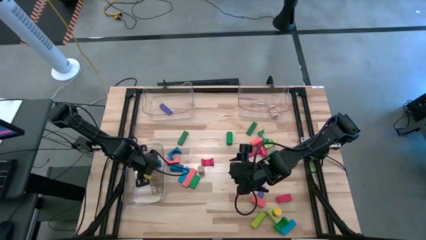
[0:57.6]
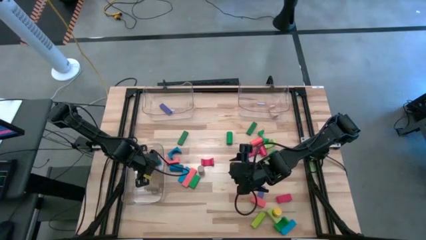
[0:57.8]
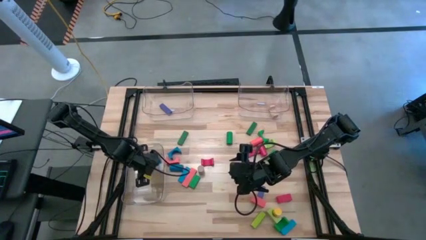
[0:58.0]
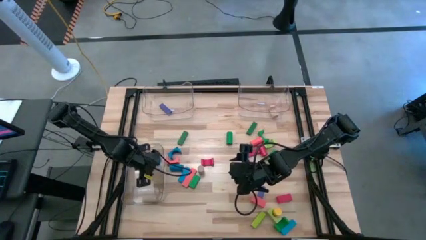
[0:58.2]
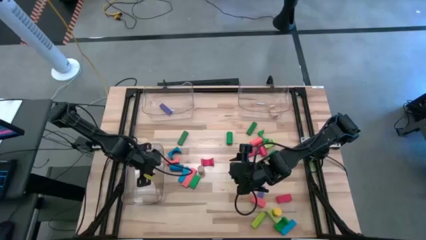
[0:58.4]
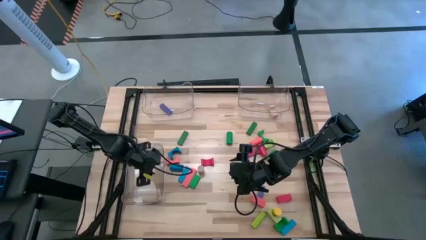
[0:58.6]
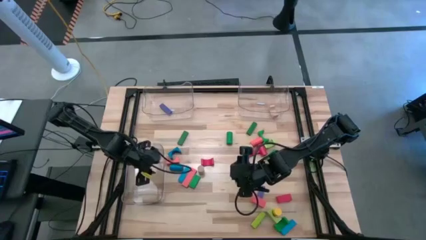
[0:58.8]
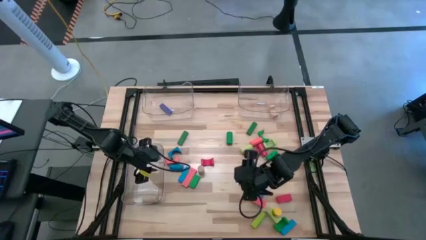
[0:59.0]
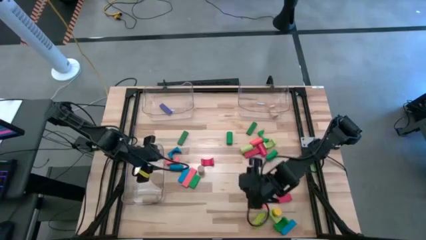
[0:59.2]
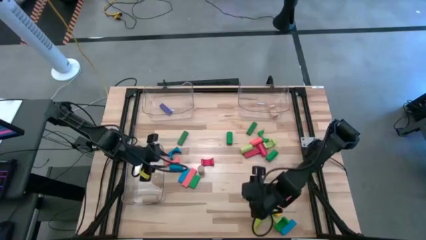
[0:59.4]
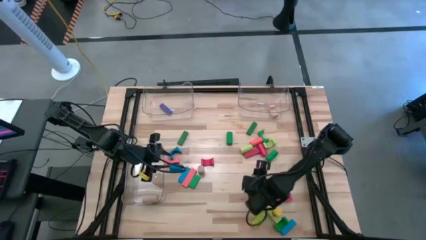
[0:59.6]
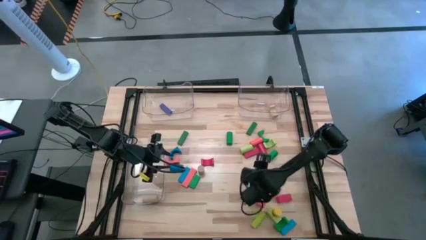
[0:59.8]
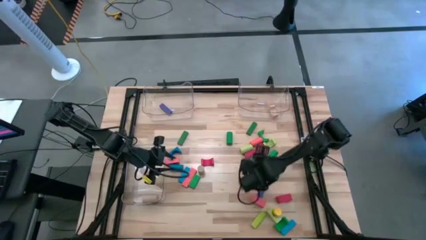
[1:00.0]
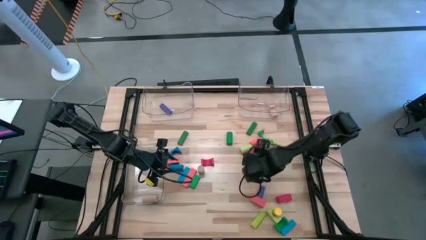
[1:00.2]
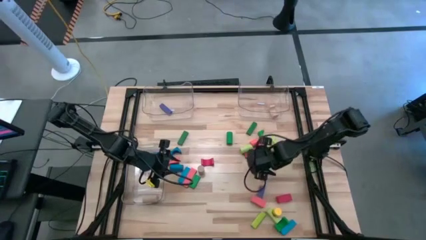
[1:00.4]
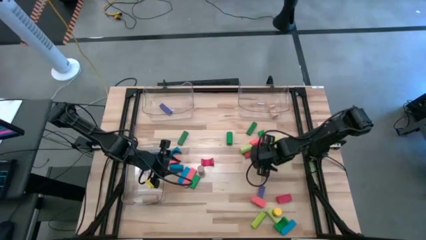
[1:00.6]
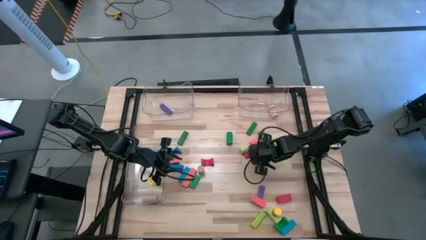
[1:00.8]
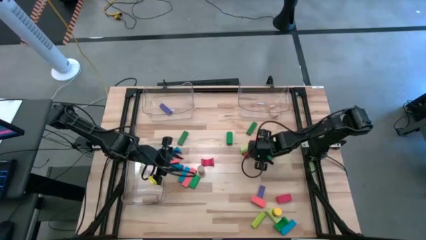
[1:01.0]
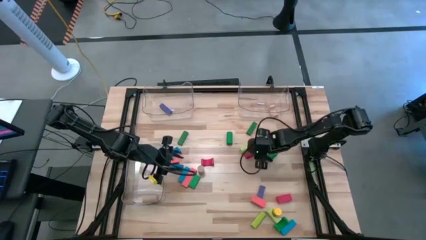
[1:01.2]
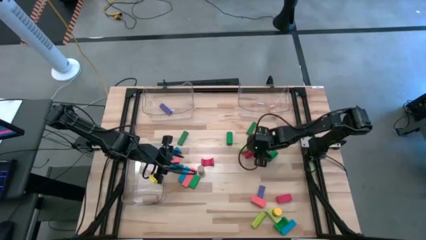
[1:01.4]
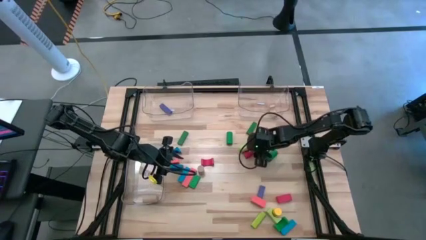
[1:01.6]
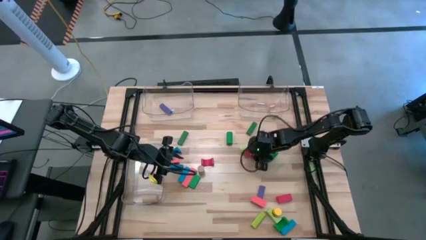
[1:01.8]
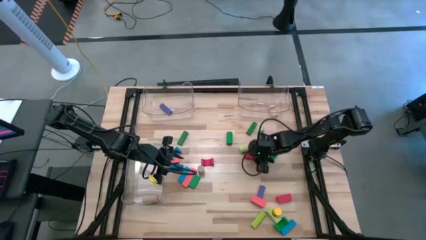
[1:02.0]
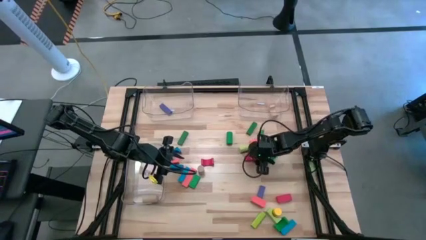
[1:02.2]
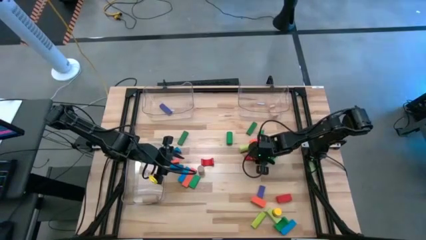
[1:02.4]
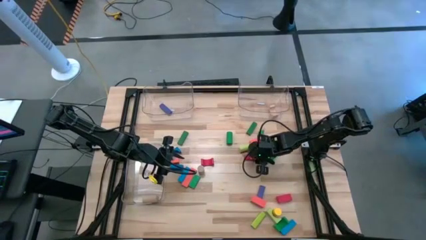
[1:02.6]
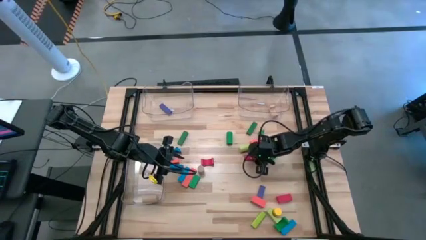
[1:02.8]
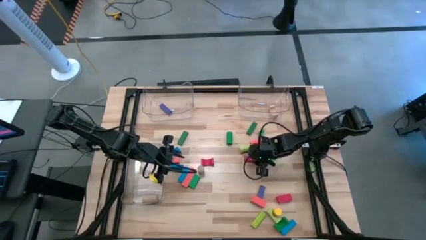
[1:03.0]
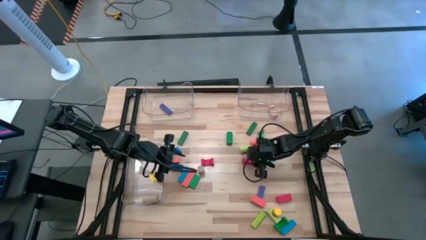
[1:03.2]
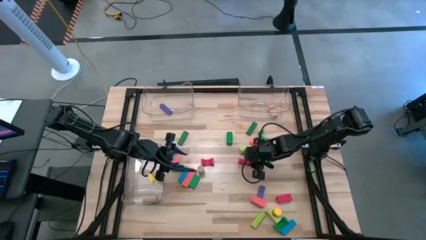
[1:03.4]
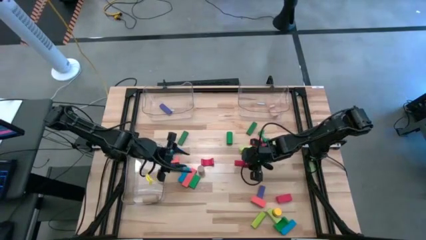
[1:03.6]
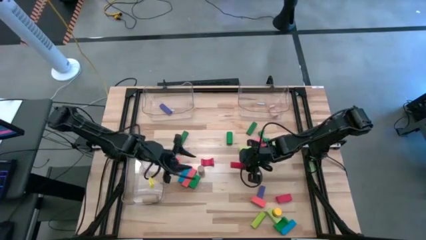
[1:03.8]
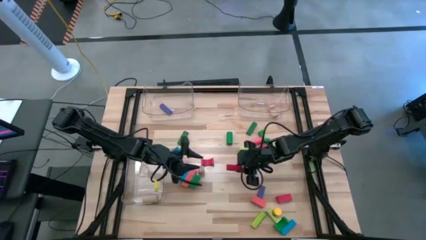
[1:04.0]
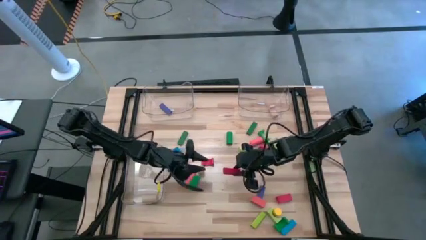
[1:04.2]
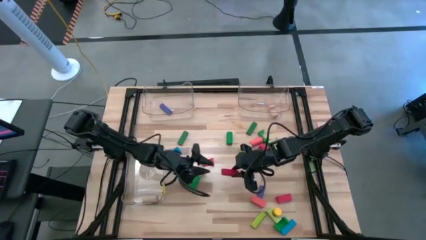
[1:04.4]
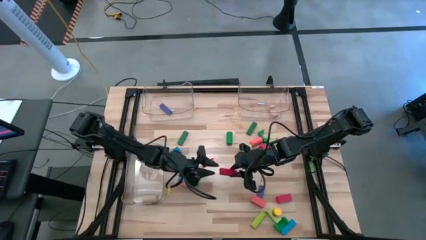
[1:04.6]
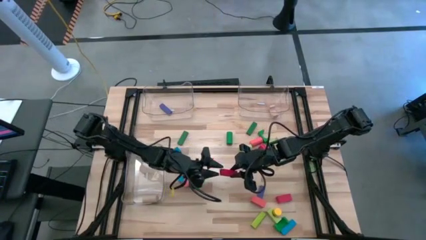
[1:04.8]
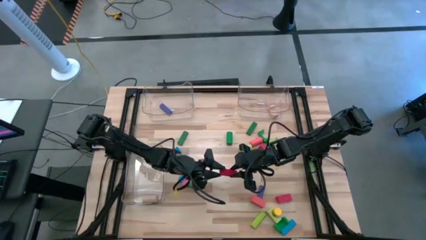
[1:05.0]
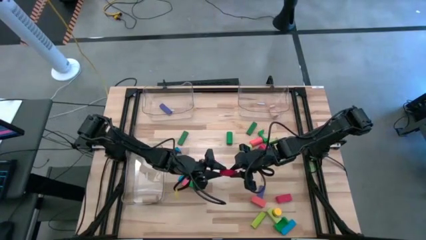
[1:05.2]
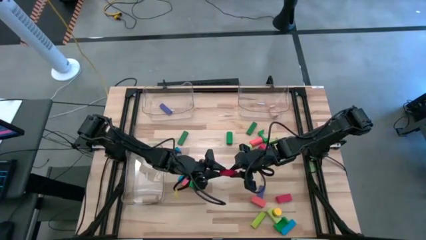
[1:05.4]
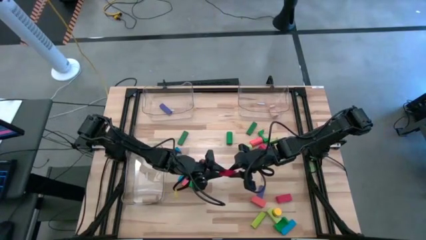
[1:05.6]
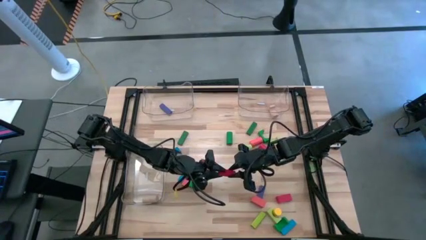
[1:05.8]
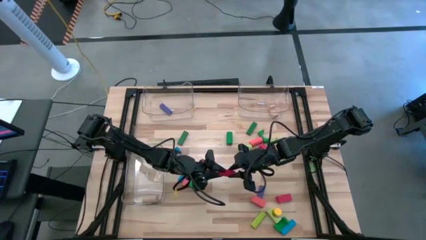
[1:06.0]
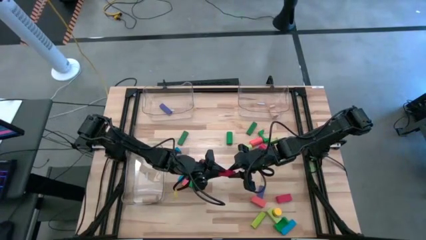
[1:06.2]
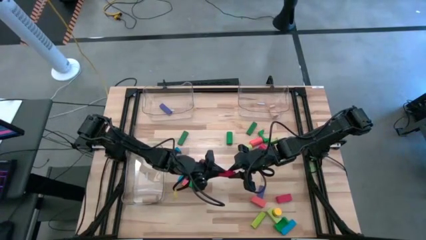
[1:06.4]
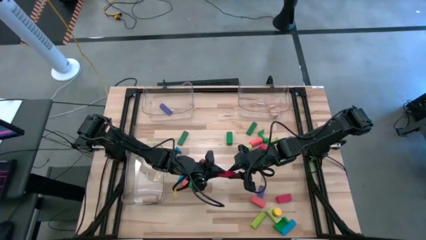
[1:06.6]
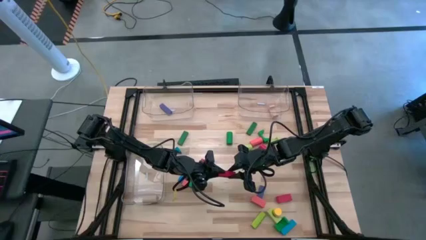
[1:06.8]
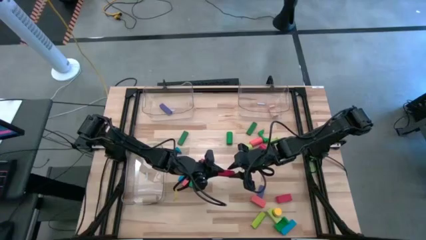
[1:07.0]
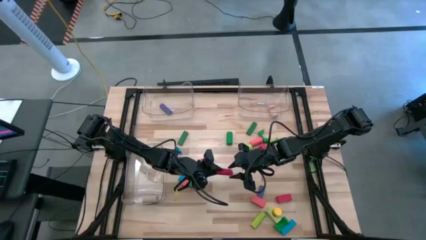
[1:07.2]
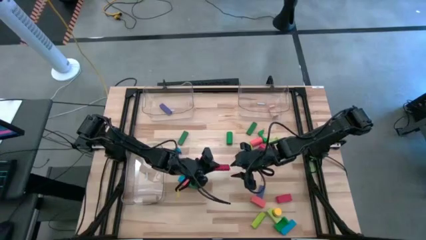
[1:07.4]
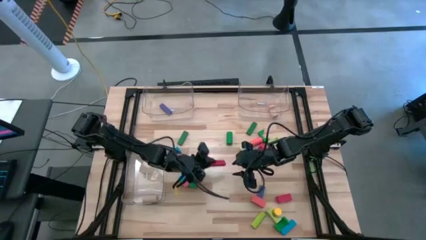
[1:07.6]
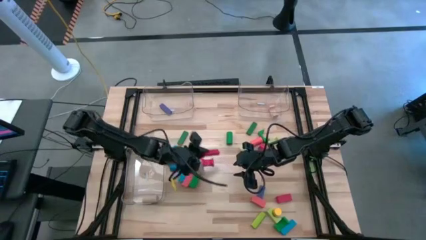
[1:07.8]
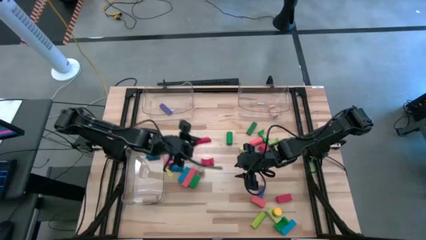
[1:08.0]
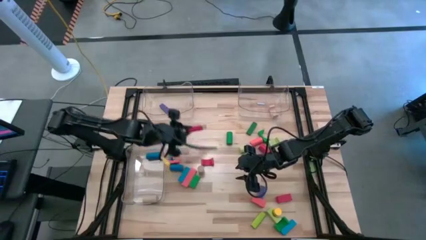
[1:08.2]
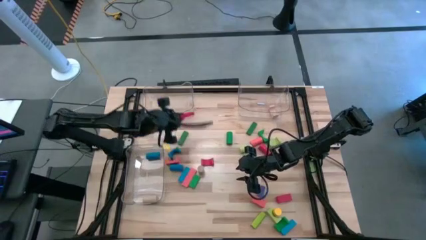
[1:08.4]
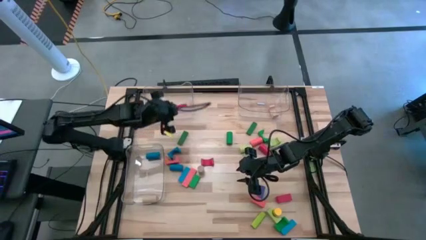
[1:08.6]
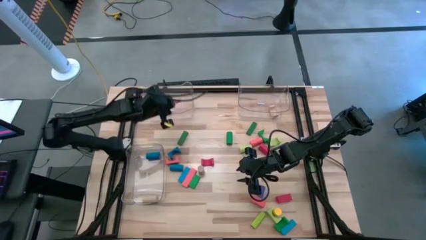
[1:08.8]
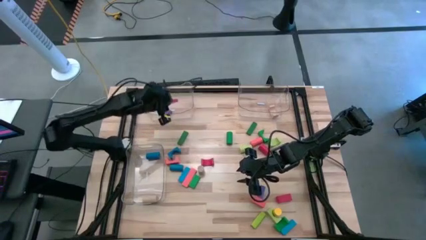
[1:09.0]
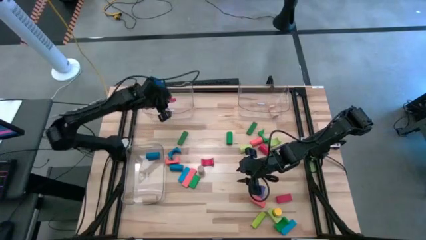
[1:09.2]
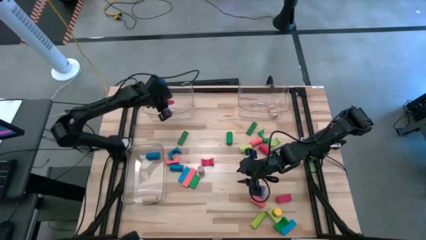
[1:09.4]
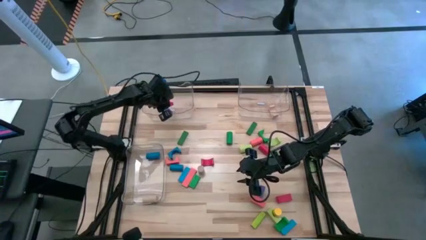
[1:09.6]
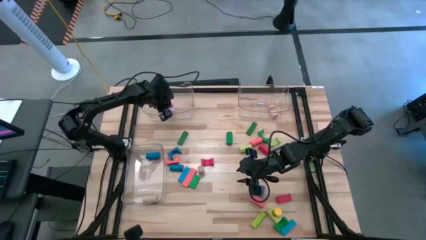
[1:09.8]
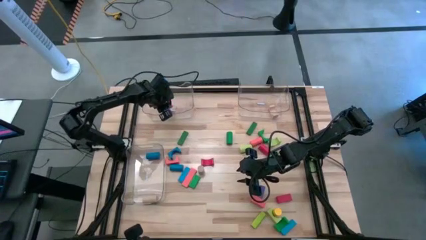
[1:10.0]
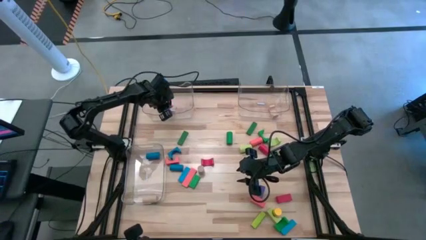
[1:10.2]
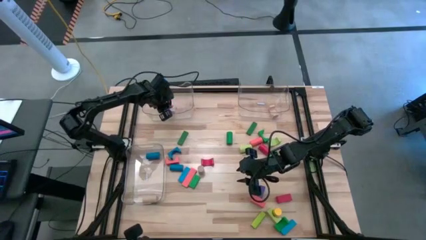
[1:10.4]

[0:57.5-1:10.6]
Task: Sort blocks by size
Put the red rectangular block into the top left transparent bin

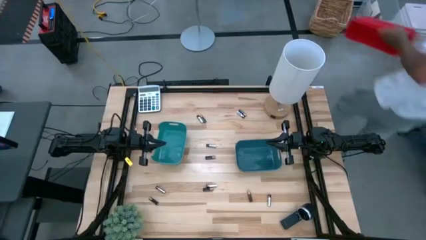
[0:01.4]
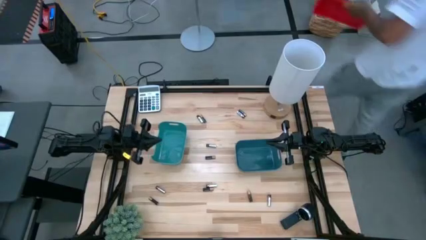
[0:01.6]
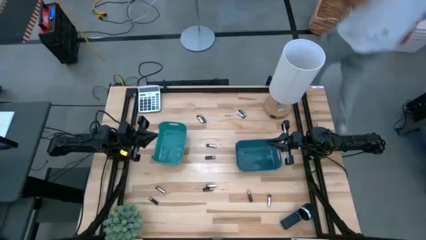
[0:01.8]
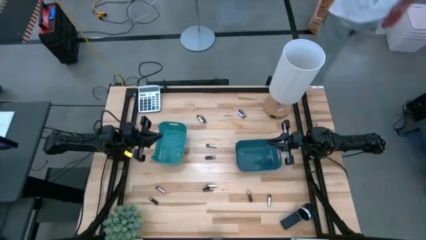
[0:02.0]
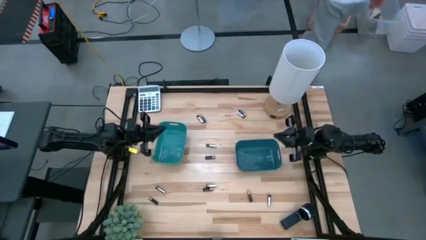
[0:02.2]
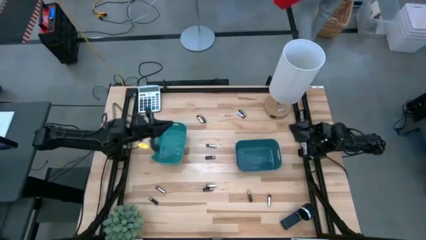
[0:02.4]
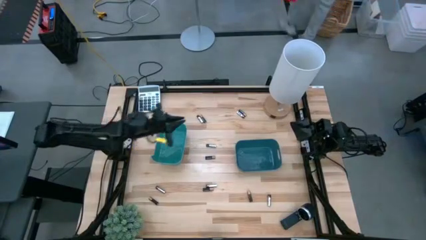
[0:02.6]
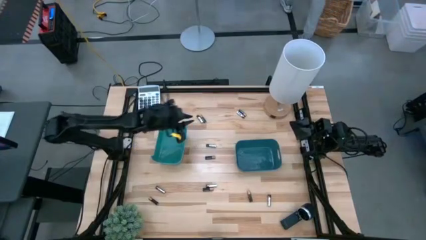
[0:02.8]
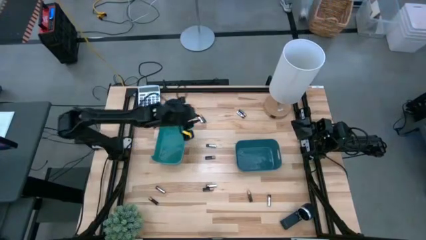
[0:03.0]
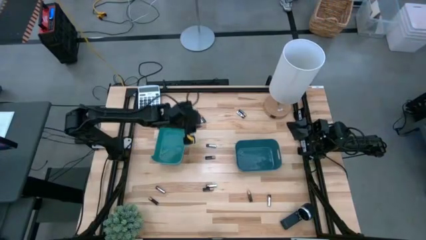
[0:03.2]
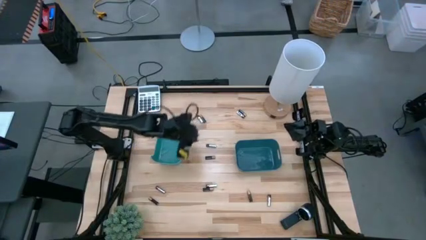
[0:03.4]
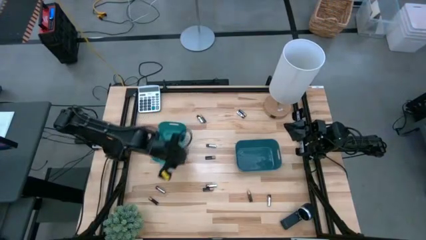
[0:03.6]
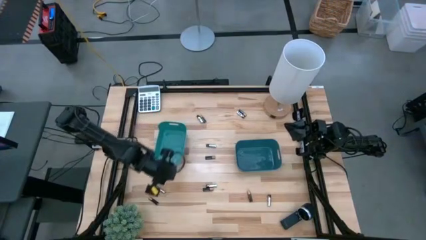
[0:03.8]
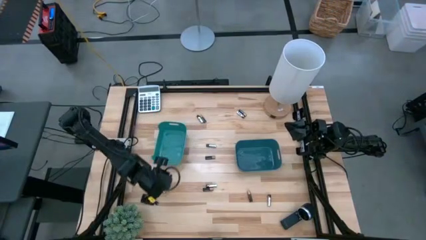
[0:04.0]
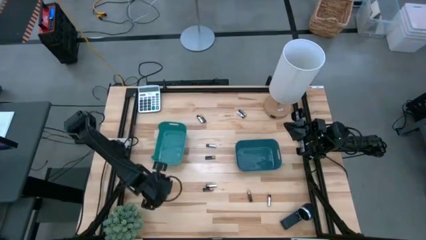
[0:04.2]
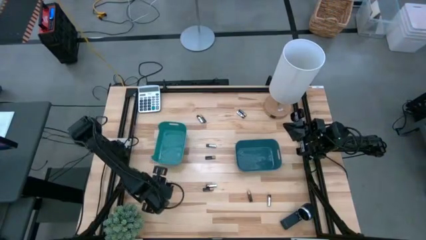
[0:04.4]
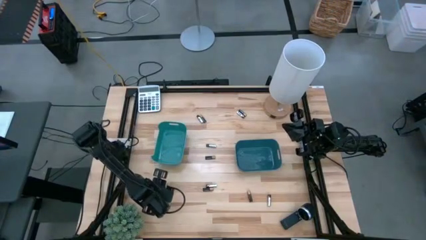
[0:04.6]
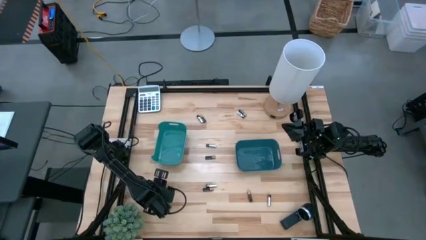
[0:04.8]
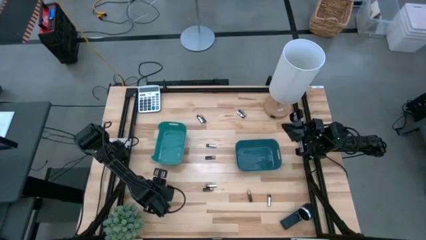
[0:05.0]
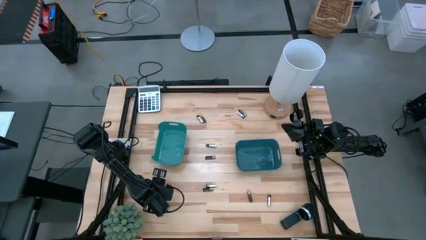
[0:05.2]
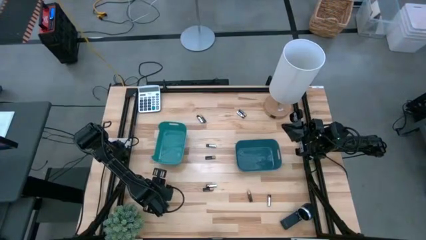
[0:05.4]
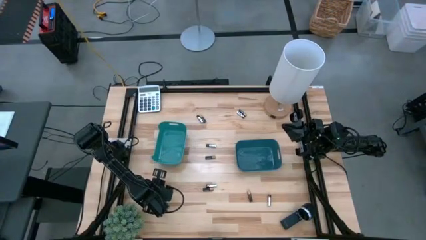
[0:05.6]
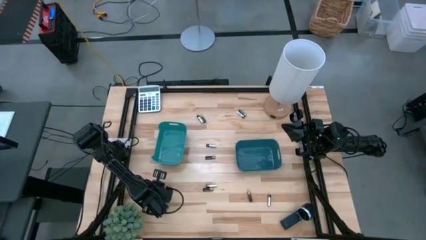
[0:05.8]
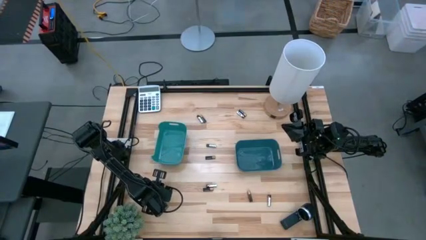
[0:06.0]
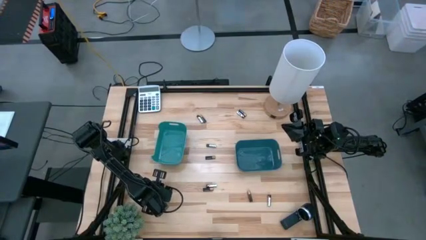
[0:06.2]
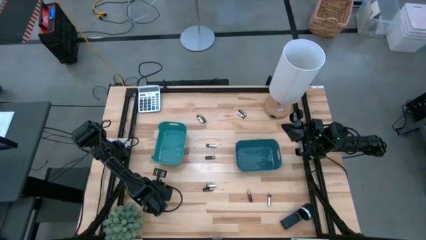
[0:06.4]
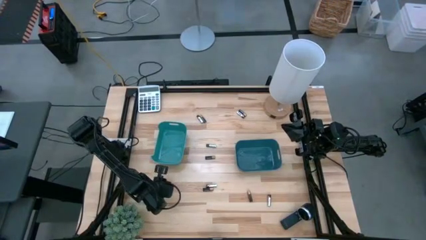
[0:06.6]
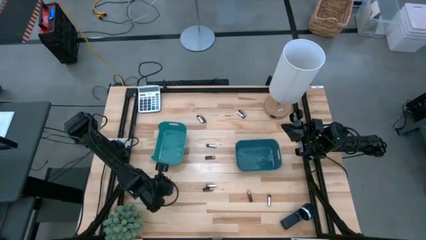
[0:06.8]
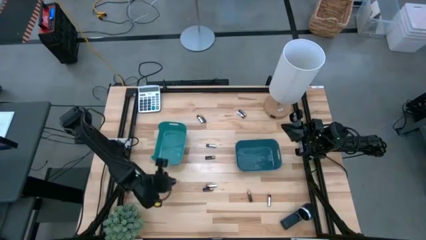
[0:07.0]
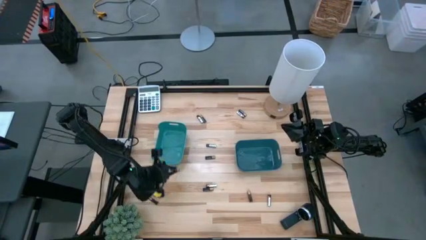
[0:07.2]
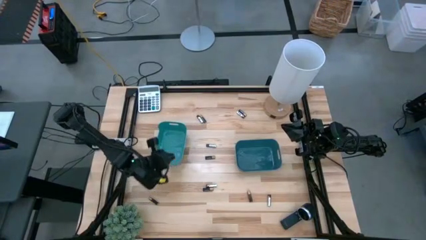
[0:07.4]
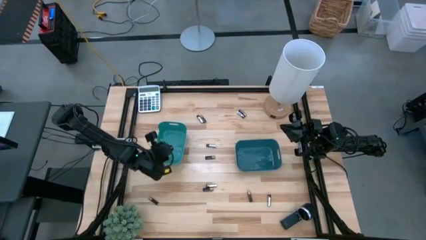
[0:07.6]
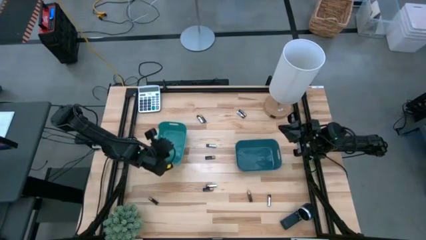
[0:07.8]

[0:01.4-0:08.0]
Task: Sort batteries
Put the silver battery into the green bin
